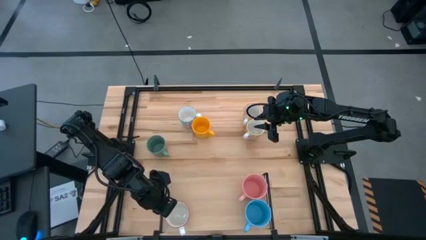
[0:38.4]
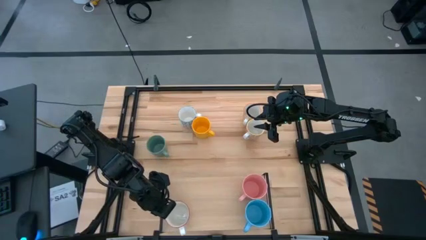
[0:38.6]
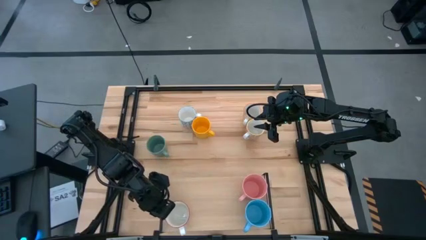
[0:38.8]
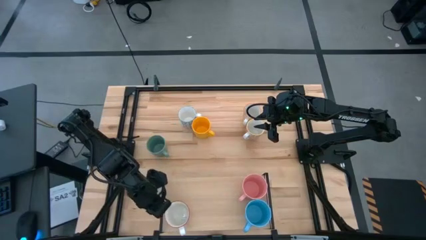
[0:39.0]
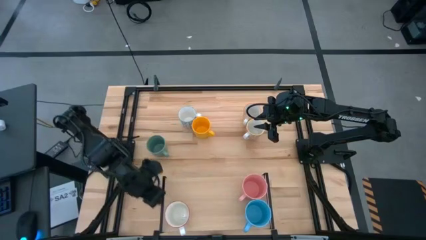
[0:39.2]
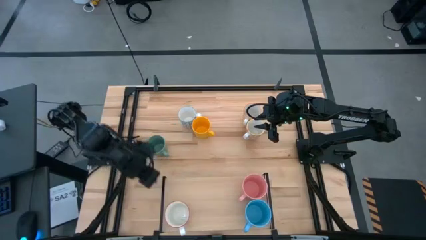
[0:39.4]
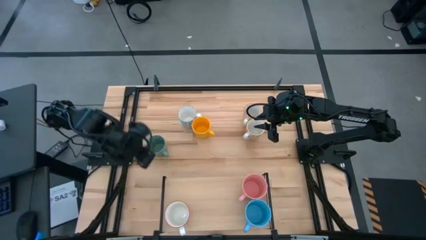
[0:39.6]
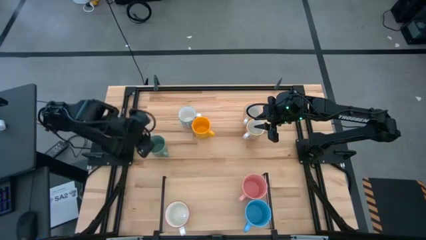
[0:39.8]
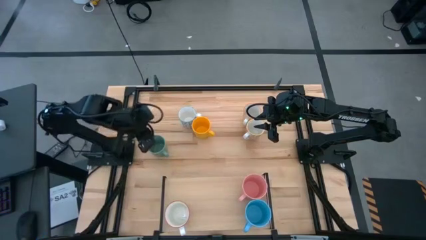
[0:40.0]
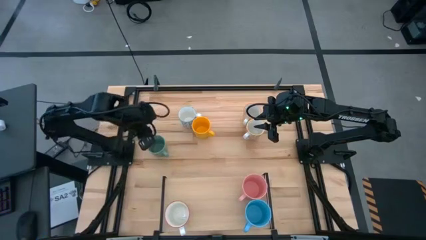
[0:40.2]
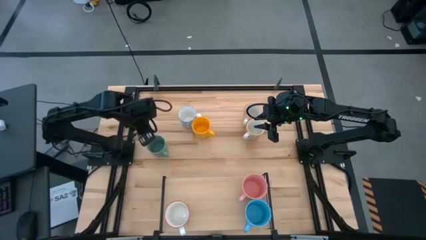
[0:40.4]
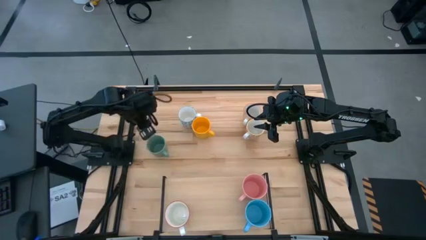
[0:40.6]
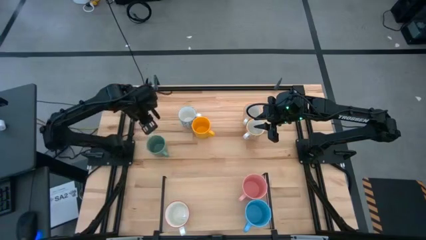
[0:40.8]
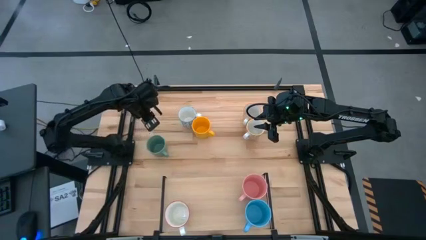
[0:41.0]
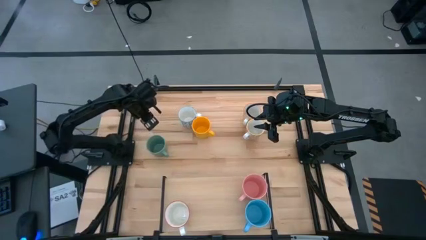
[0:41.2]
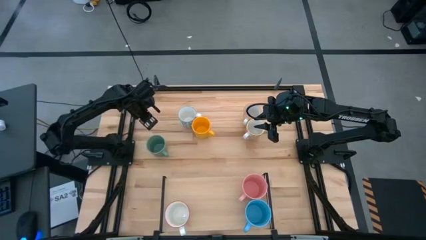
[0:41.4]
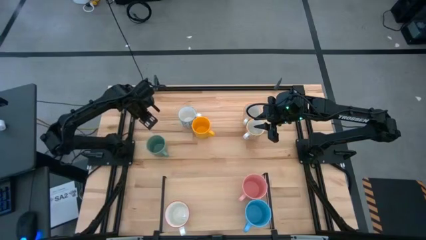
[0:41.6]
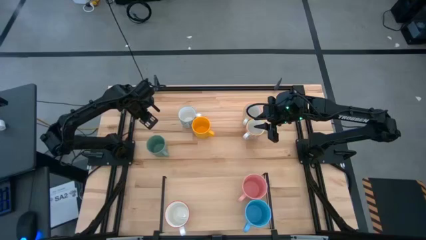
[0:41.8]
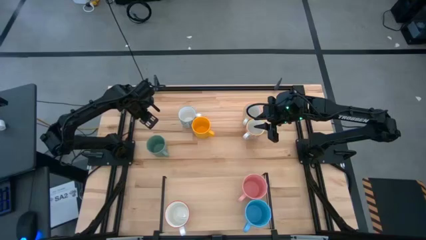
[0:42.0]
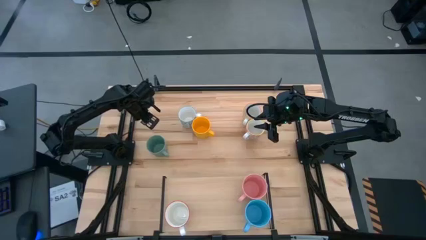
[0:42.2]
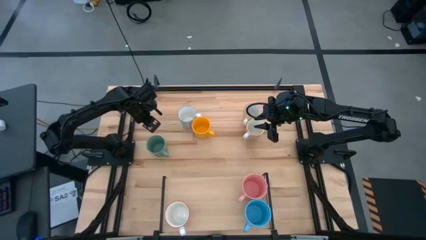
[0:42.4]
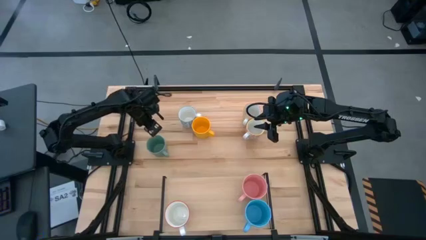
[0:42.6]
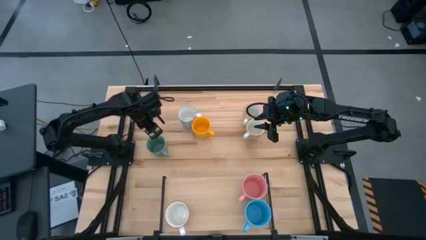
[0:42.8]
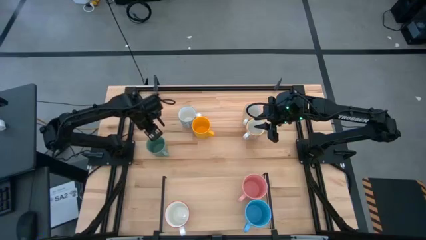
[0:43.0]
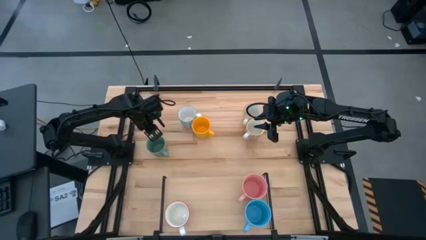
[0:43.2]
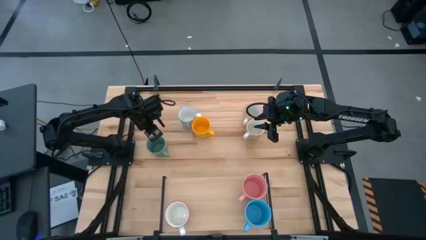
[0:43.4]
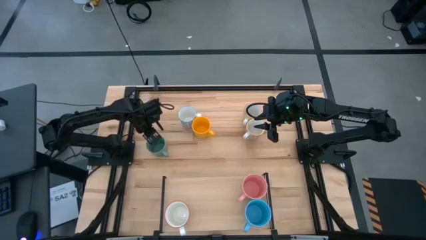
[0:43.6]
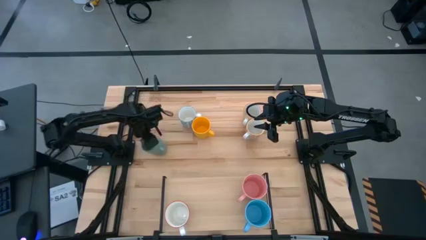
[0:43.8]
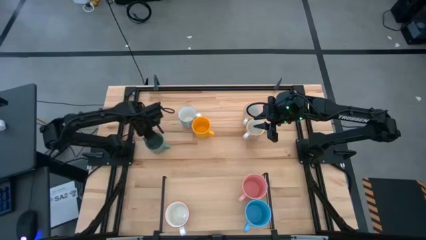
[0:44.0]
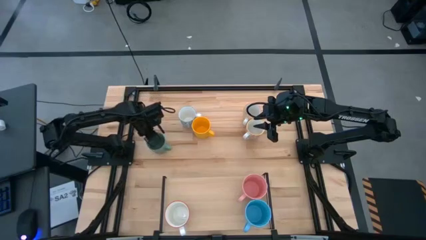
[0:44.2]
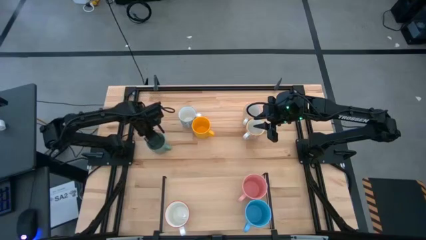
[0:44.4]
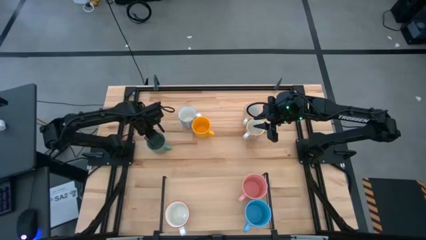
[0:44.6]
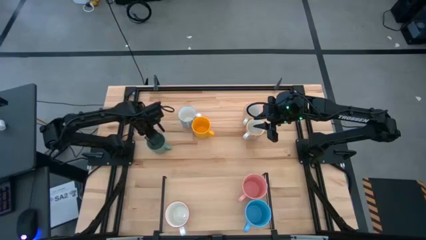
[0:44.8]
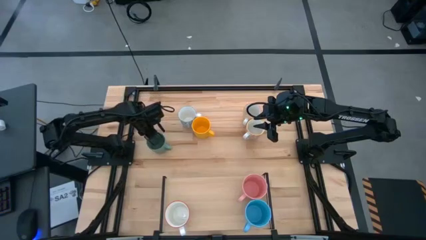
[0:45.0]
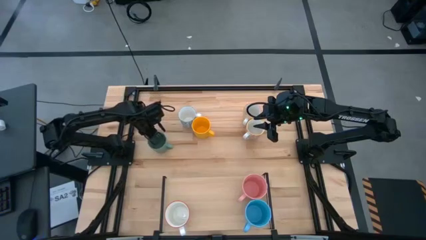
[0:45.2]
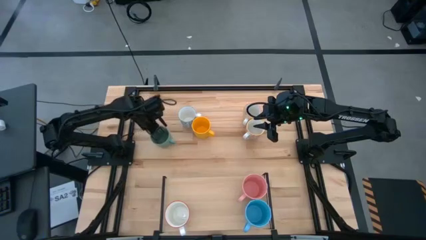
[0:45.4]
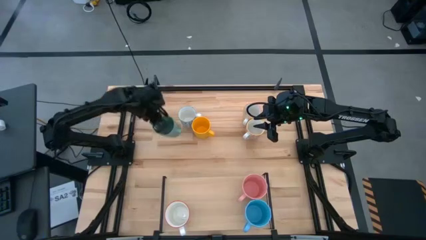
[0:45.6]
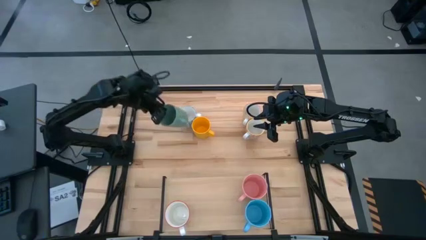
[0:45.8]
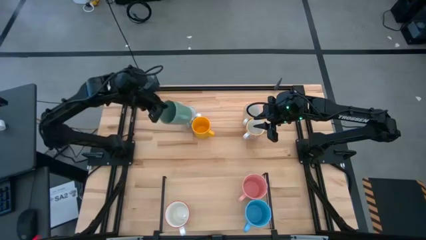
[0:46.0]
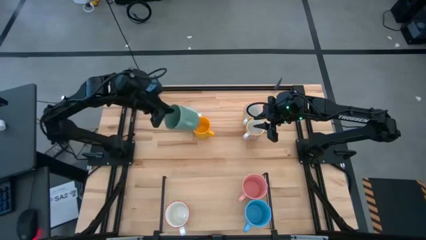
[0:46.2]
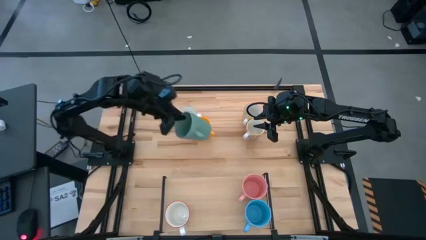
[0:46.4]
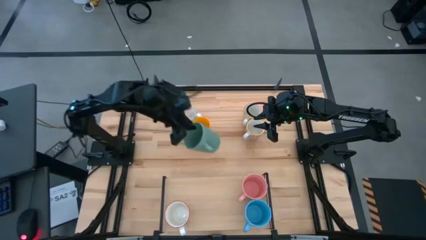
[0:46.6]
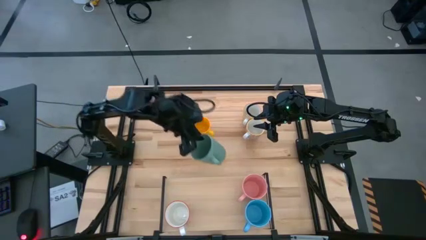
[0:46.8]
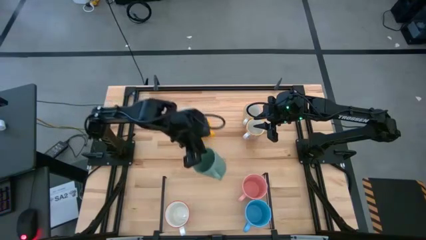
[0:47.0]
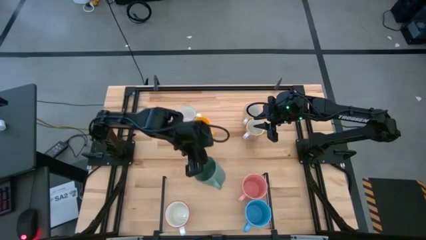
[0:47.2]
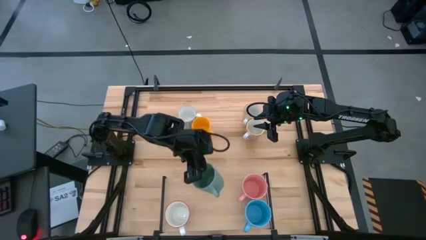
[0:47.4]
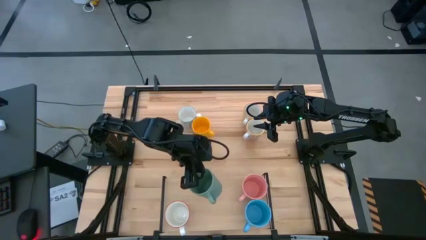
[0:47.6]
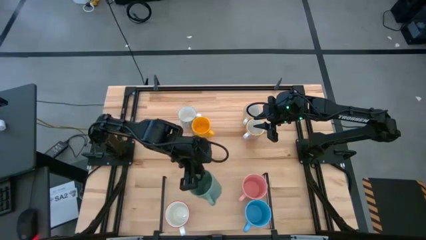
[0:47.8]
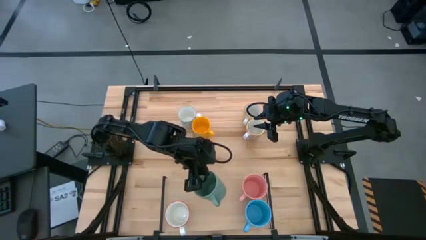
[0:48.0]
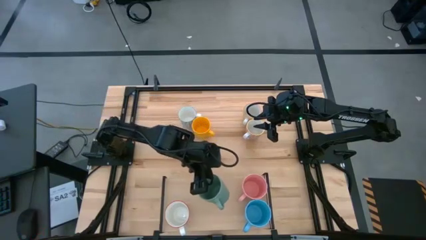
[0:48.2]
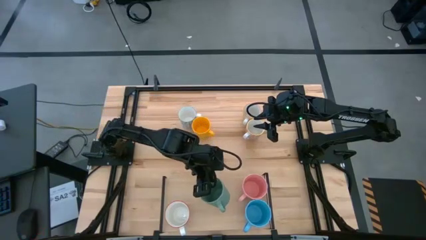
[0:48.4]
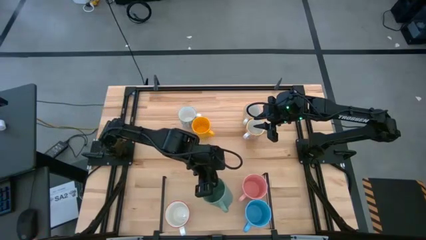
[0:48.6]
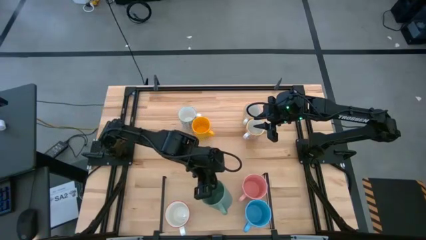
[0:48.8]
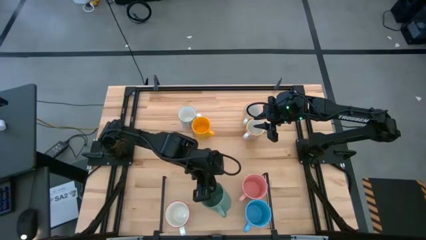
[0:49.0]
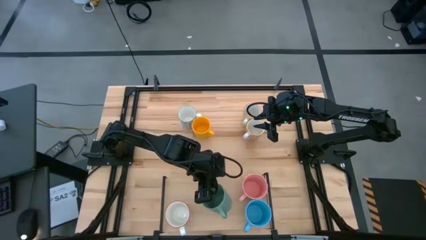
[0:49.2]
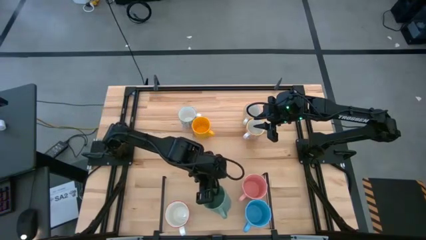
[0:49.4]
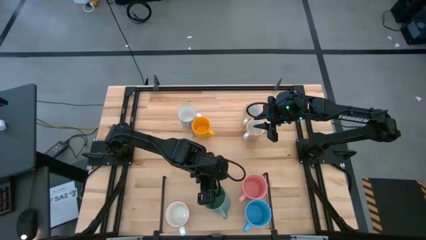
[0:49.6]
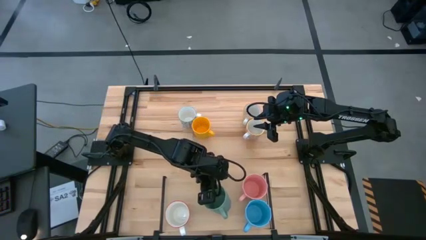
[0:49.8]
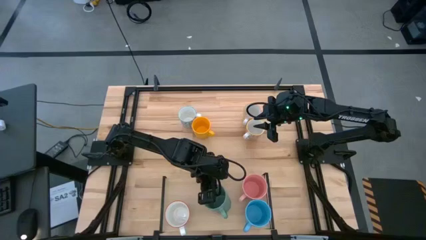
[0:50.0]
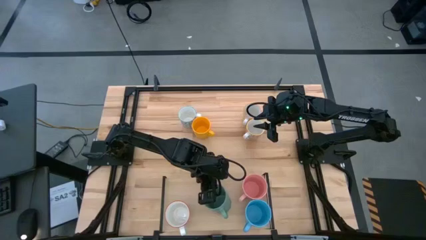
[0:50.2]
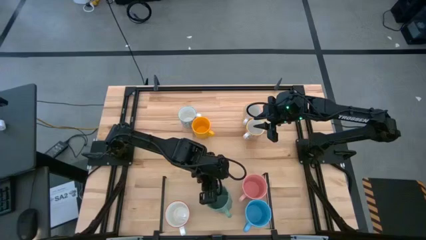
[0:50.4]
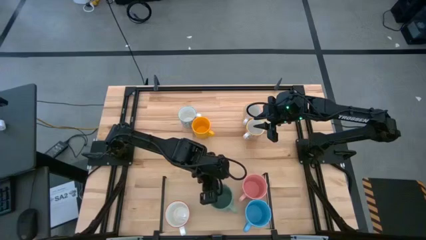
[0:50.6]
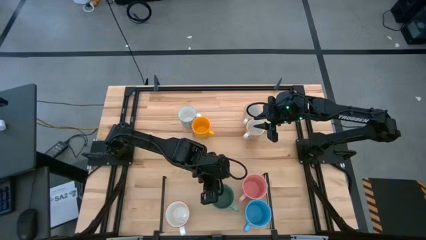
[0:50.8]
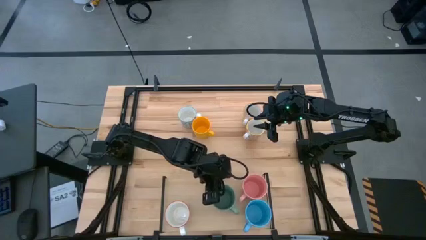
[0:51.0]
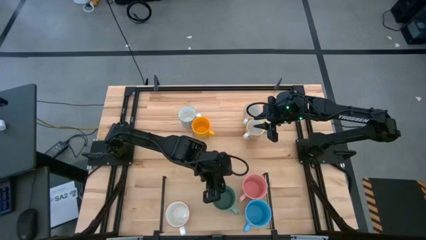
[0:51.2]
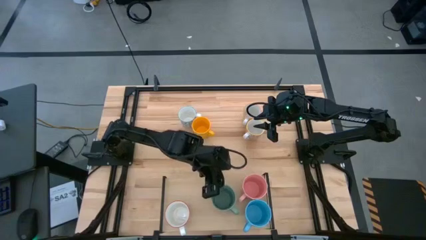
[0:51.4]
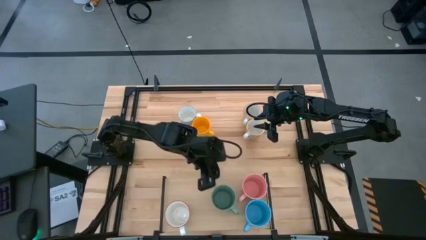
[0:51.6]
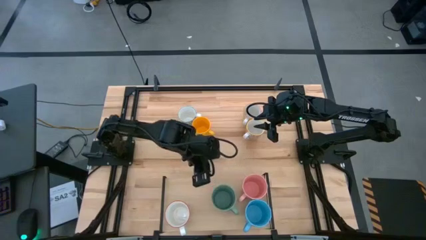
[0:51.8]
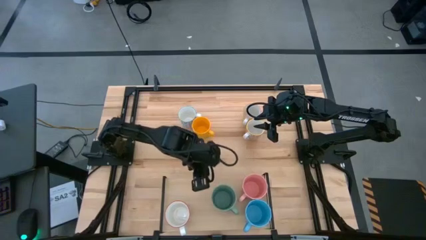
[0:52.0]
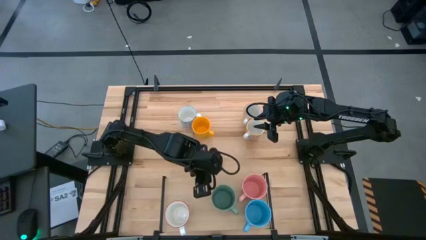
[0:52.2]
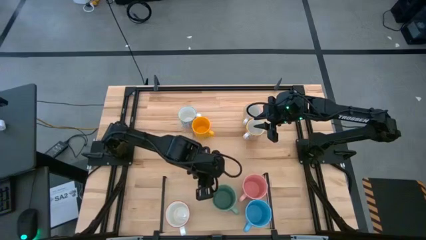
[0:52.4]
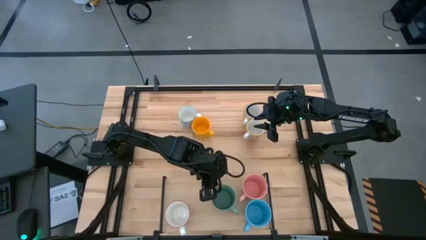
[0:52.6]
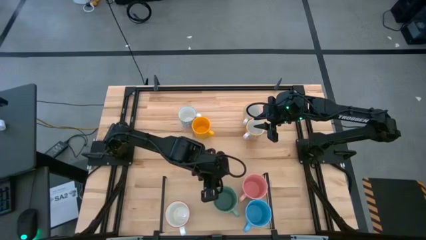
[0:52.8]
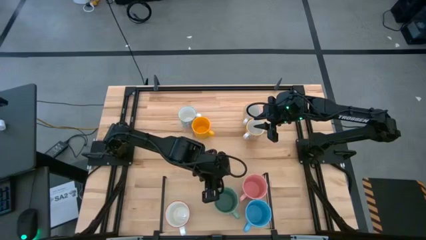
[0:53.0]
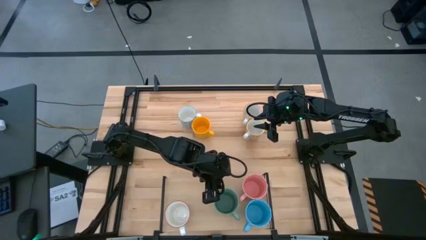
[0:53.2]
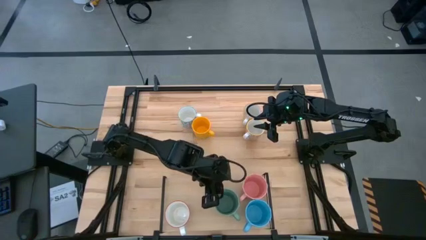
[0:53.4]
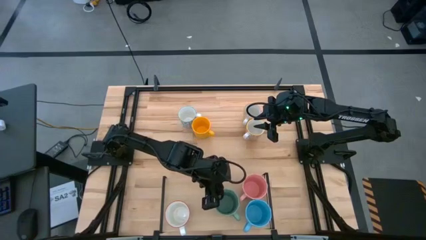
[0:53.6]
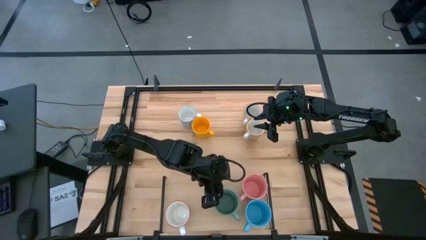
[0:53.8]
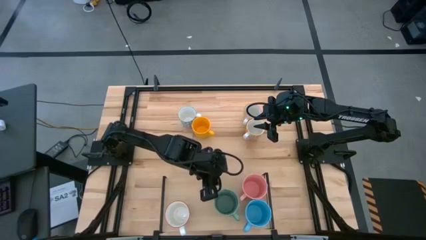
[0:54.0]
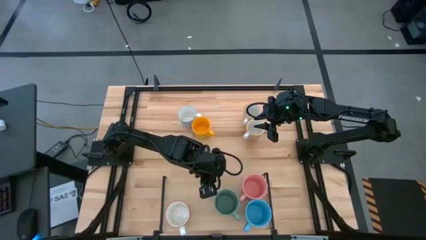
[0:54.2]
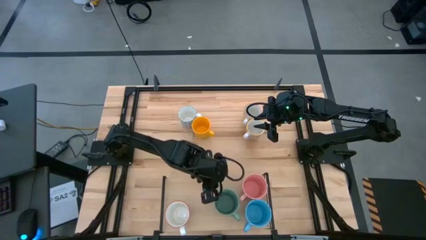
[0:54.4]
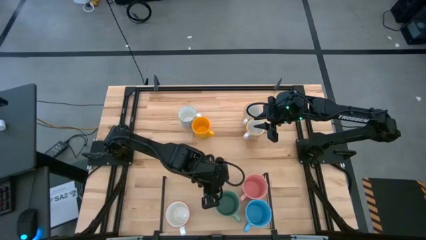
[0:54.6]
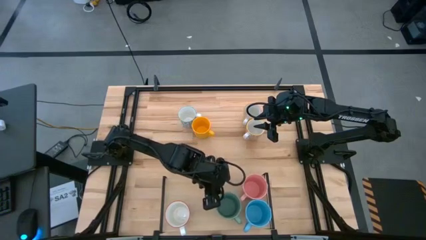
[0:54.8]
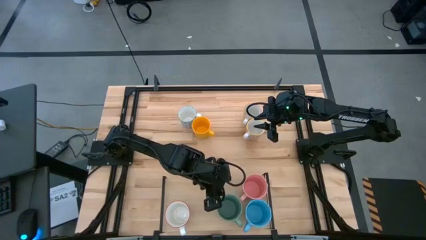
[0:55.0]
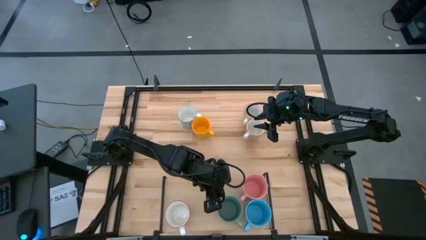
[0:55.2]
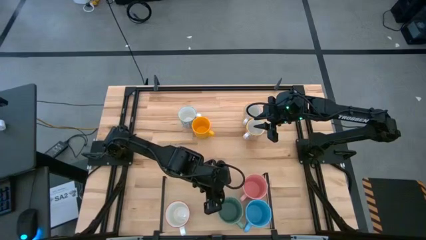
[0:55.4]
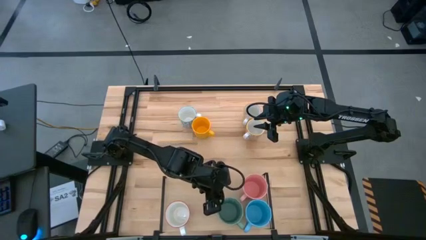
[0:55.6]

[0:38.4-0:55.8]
Task: Place coffee mugs
Put the green mug on the shelf
